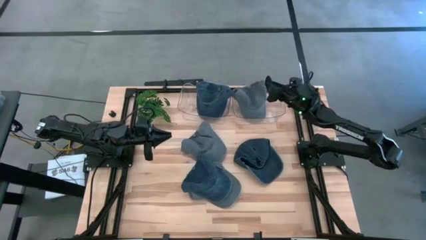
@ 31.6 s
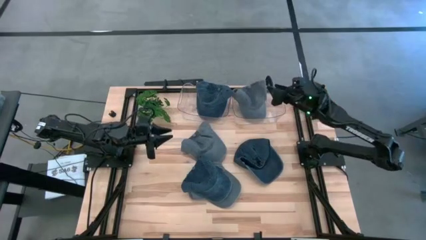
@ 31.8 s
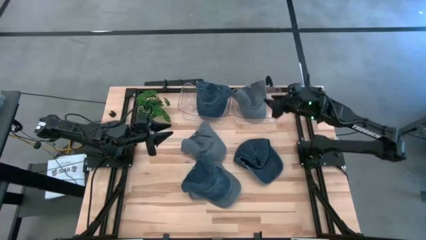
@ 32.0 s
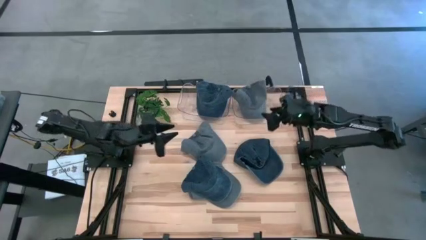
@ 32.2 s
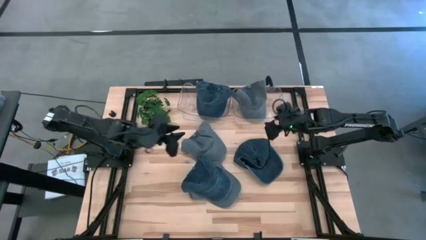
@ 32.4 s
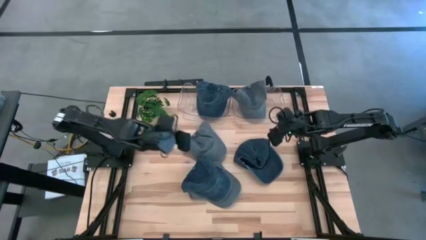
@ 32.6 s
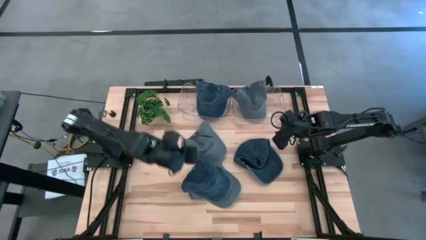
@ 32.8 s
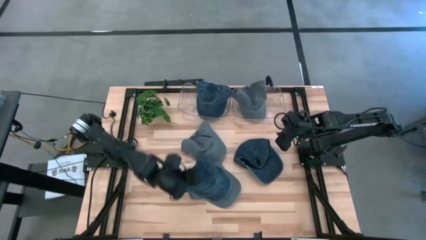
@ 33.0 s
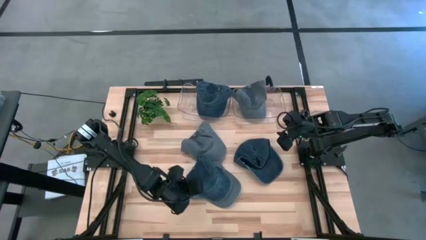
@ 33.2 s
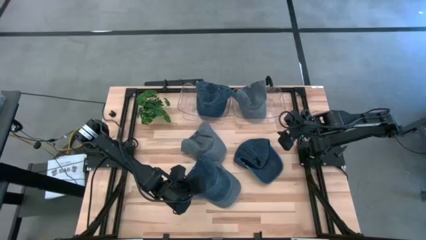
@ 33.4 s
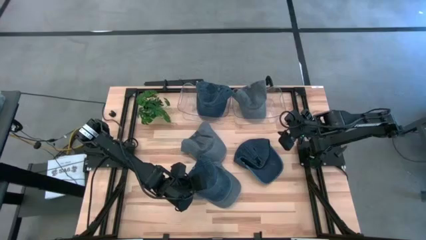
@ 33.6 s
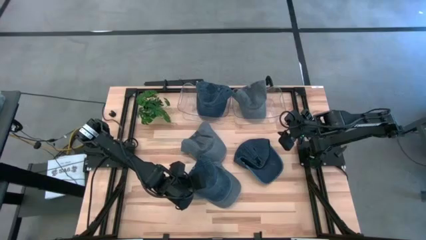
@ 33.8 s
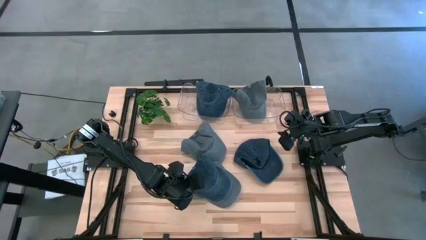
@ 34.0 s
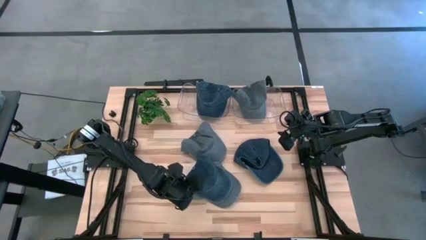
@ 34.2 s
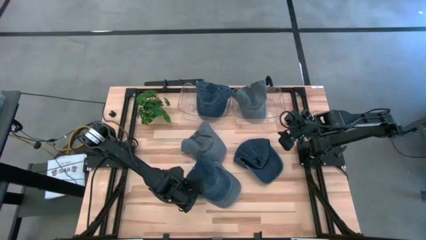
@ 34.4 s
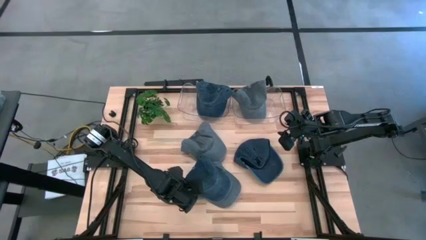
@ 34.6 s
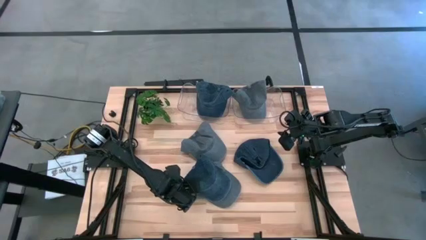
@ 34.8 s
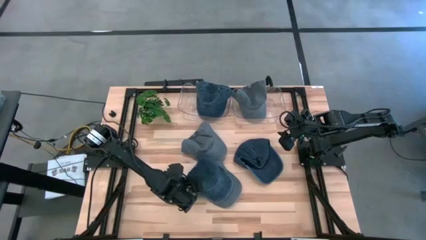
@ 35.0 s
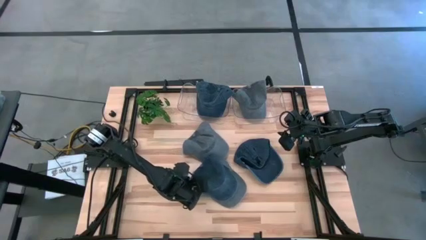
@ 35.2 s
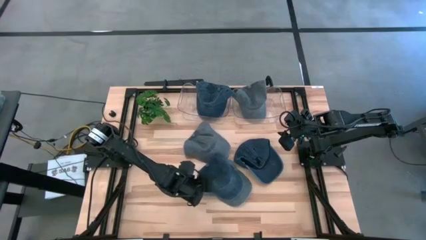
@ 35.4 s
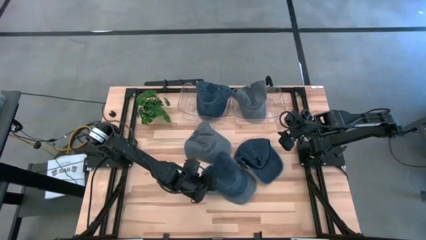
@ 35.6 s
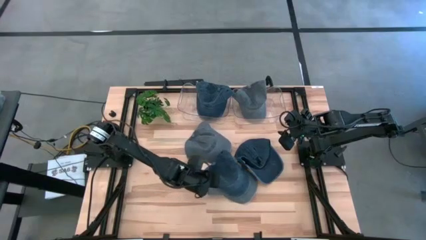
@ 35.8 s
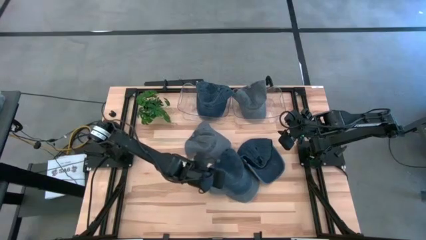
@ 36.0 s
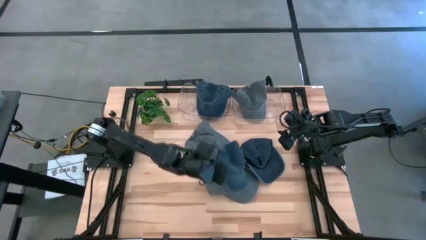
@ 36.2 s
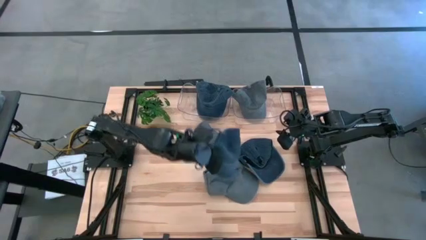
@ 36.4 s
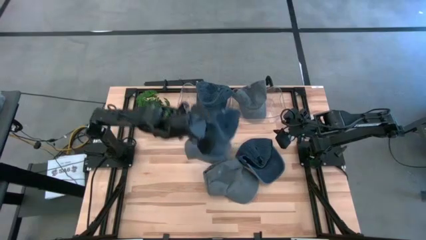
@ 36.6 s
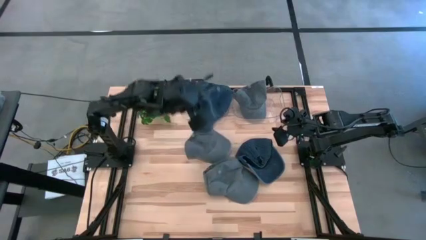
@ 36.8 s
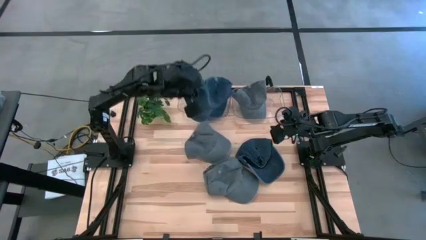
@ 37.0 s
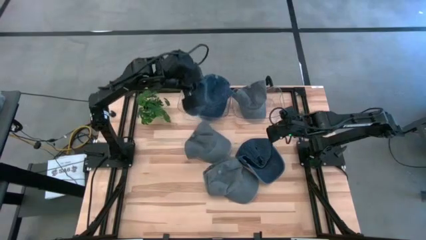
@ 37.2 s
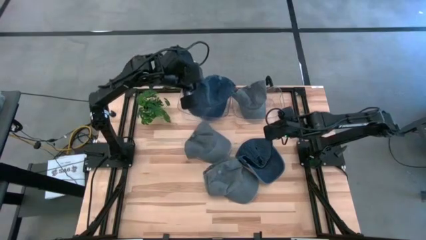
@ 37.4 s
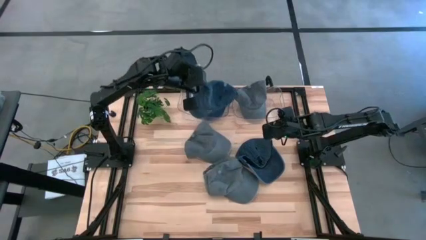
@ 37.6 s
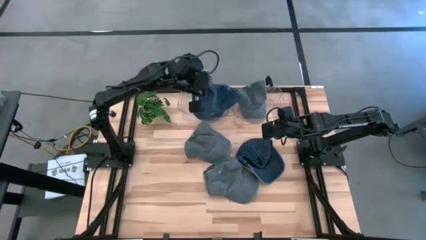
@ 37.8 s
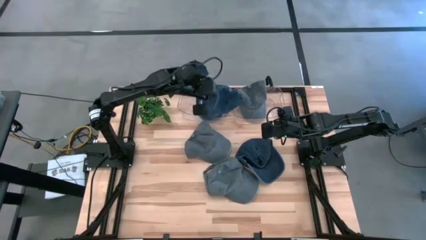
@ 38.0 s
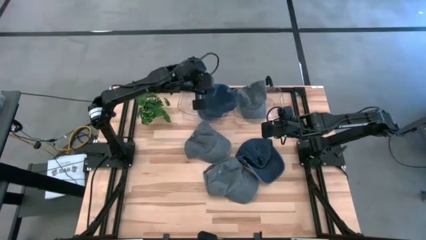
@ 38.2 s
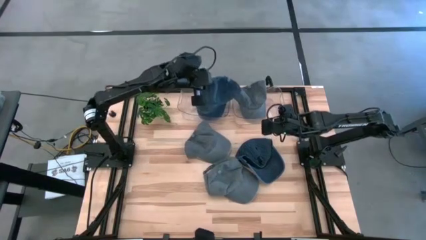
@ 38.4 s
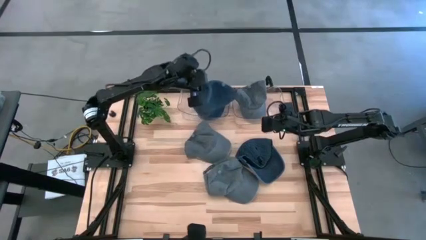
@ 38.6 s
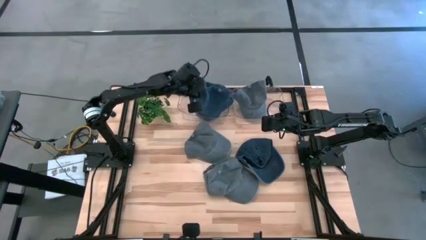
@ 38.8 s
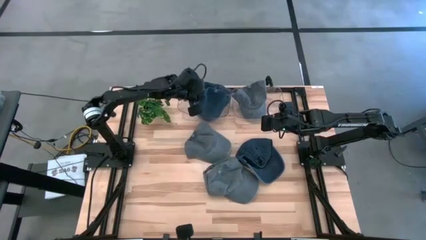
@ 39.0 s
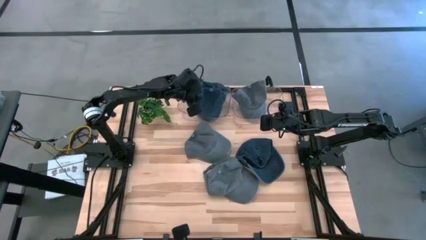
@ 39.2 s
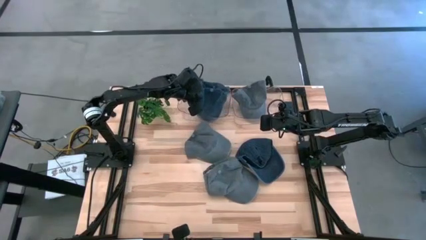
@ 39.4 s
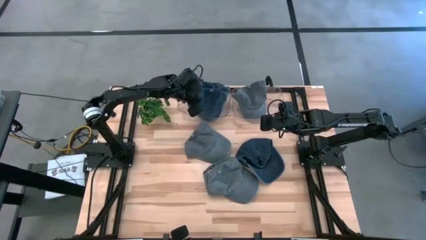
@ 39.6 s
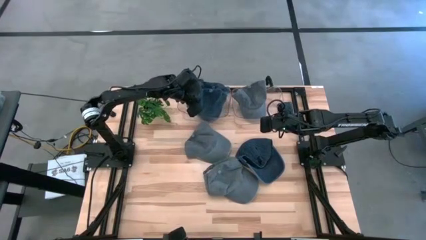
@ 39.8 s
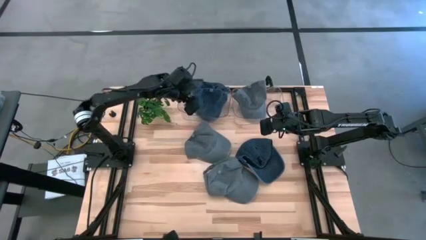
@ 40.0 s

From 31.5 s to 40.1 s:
Task: Pick & Place hat
Put the left blue cap into the left transparent bin

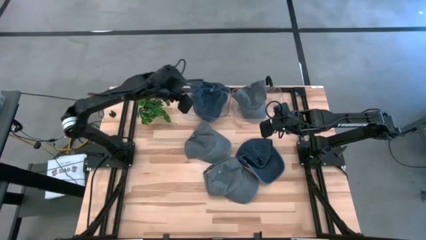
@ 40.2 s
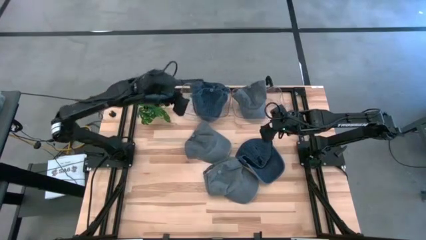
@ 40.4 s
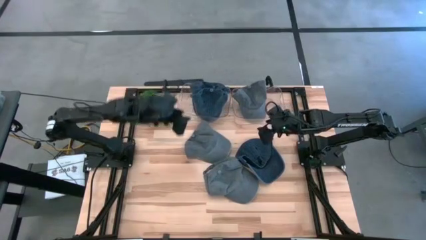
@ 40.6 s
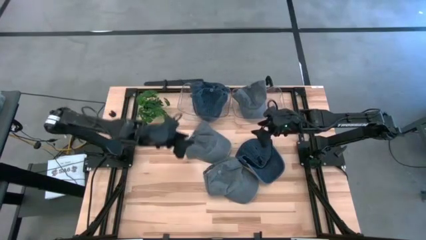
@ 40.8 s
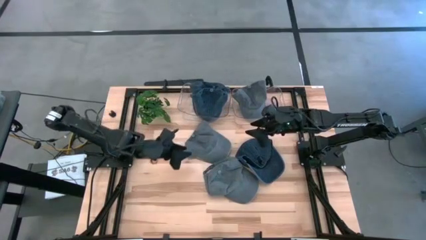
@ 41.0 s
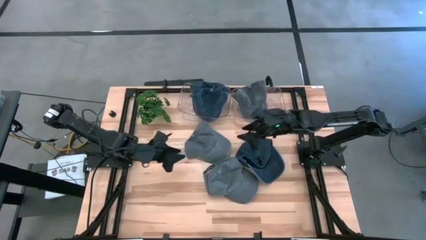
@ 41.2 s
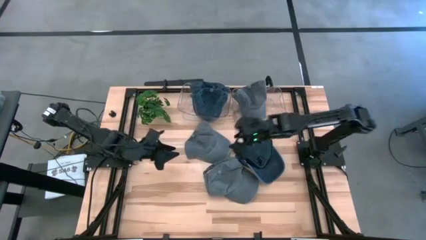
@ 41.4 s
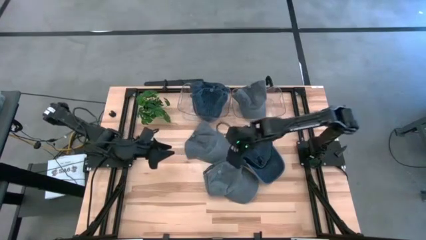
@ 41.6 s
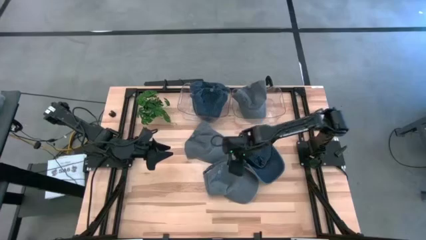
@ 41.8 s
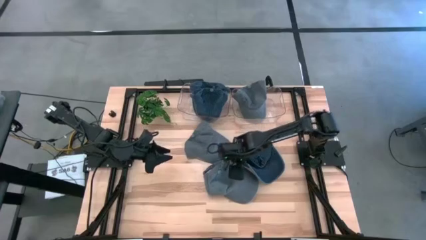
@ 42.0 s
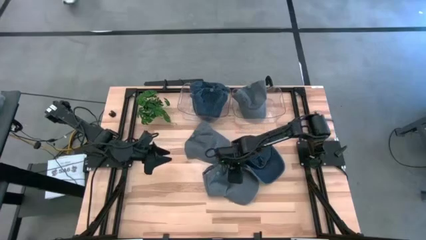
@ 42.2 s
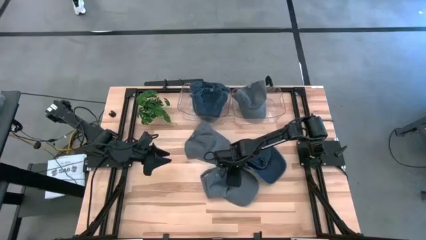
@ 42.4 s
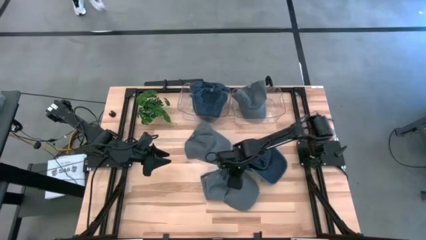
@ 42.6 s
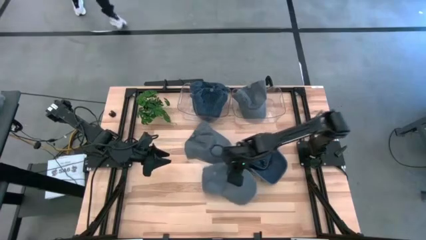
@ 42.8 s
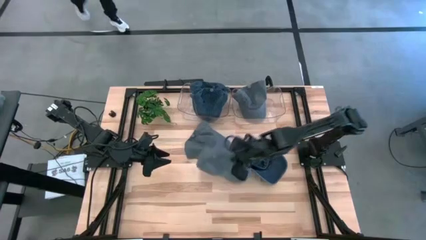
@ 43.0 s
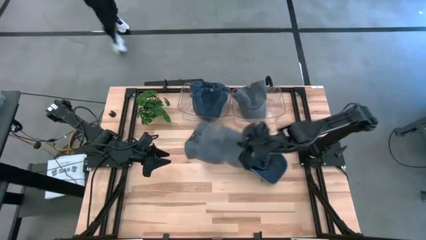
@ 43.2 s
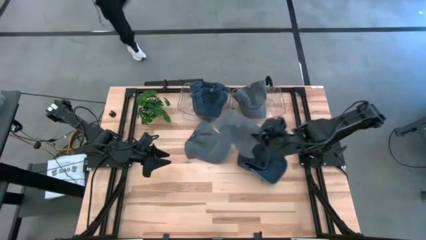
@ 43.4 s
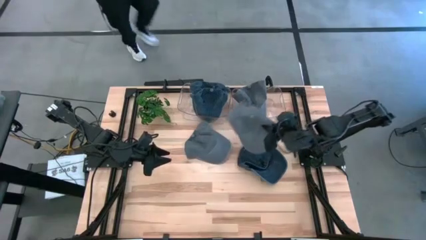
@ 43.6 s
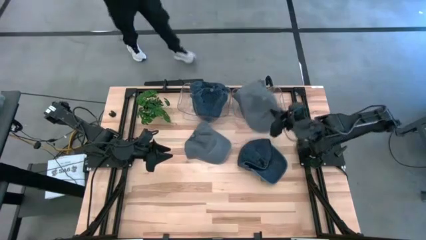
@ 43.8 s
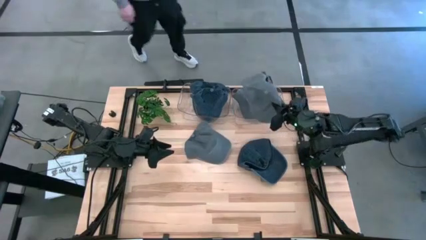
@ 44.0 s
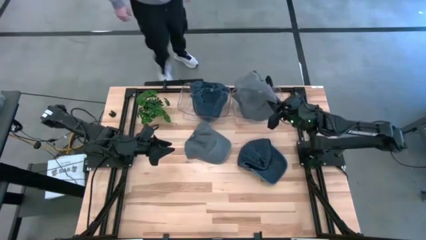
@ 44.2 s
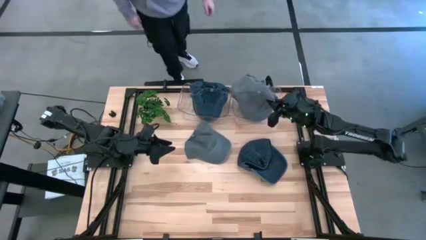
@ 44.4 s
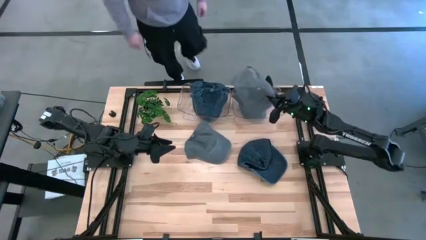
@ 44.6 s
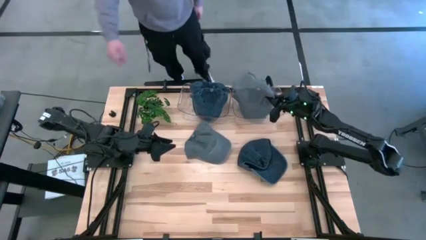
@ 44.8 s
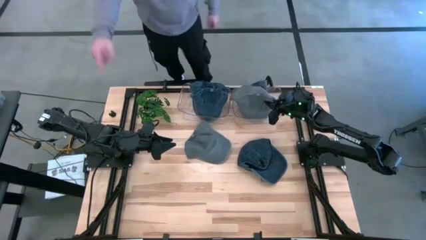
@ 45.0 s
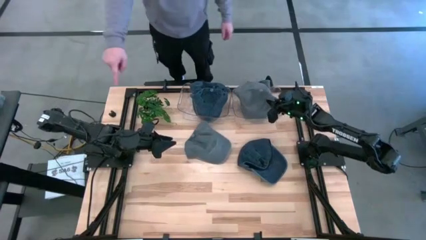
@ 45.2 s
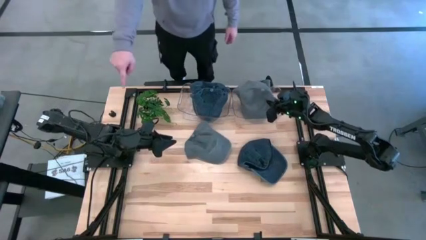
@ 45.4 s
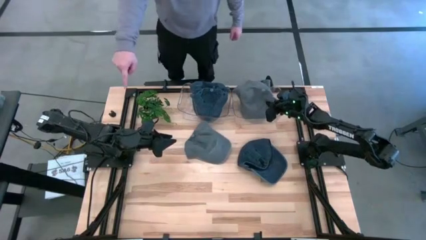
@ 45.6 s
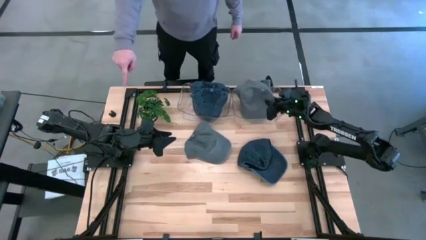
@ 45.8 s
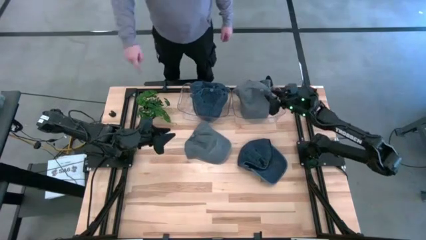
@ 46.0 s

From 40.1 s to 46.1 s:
Put the bottom gray cap into the right transparent bin
